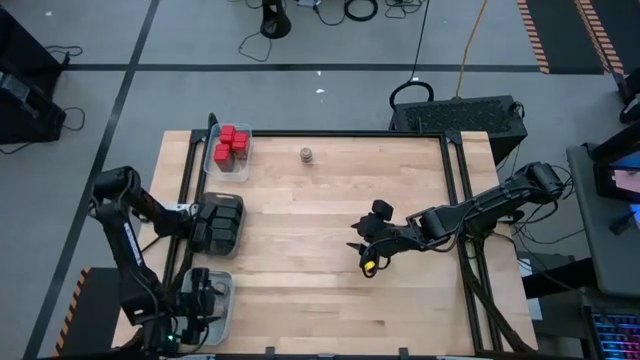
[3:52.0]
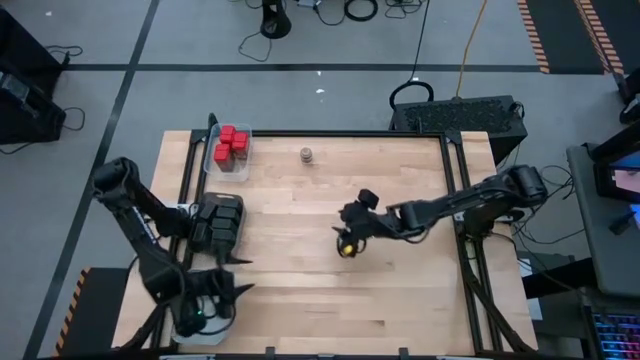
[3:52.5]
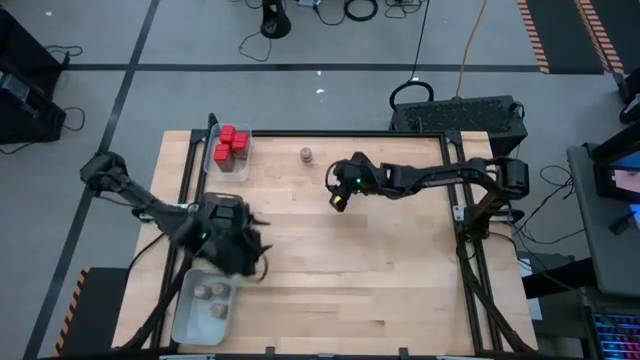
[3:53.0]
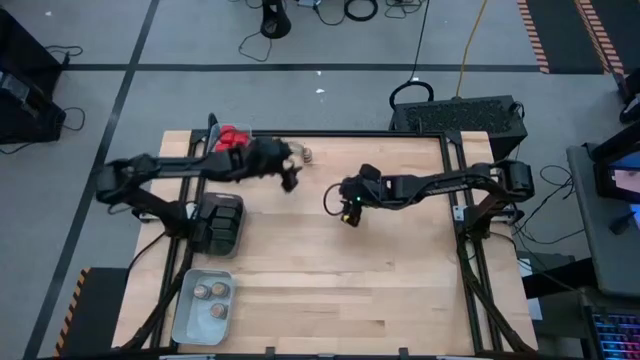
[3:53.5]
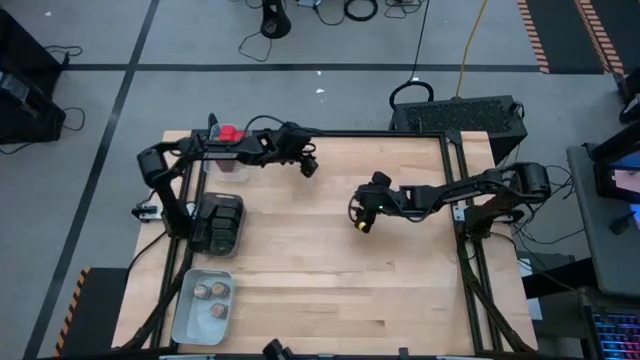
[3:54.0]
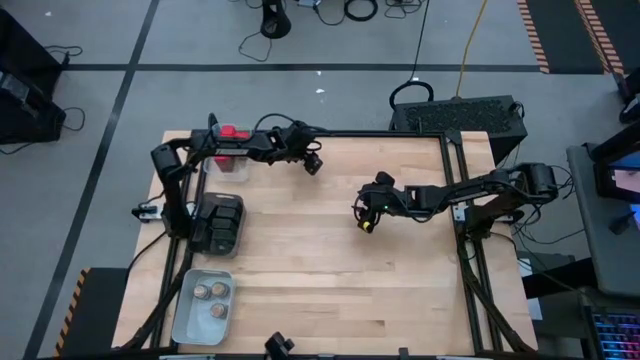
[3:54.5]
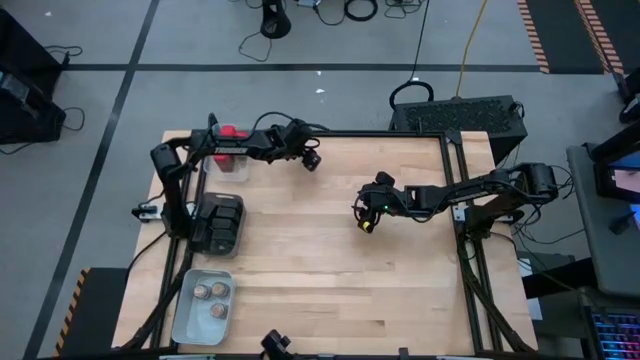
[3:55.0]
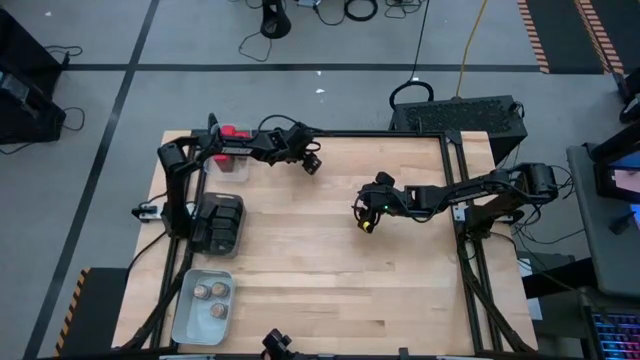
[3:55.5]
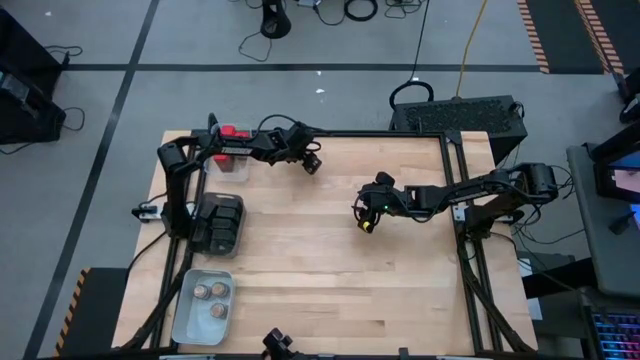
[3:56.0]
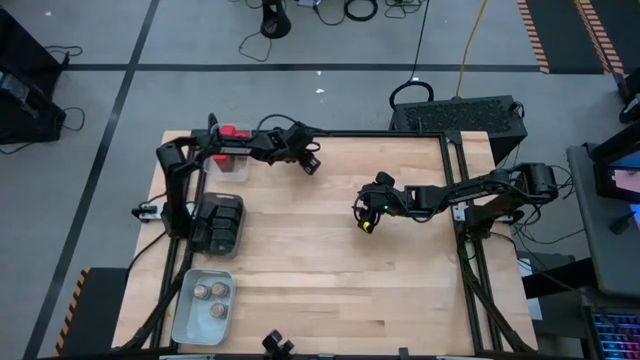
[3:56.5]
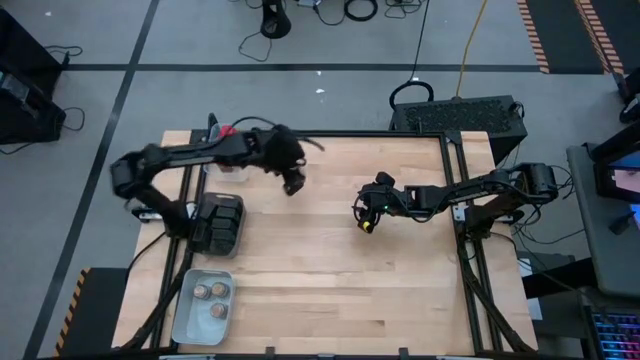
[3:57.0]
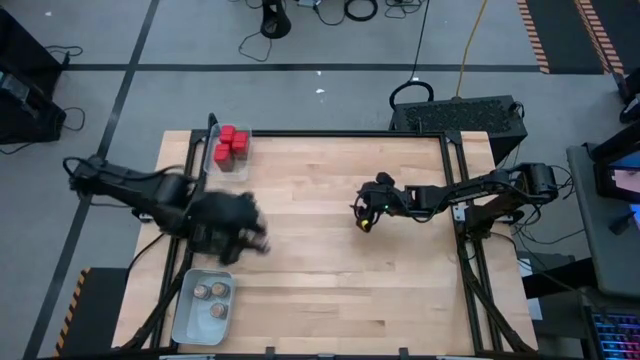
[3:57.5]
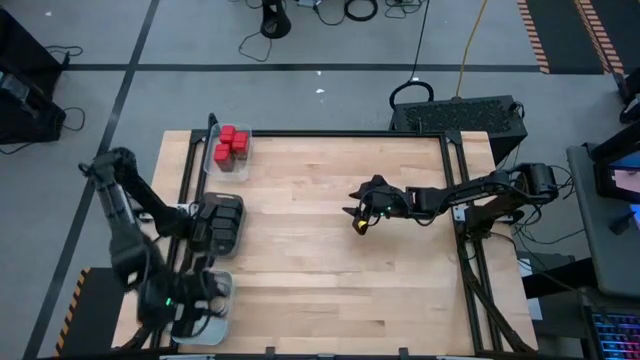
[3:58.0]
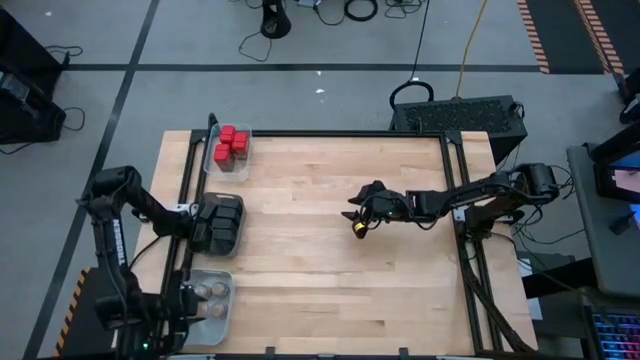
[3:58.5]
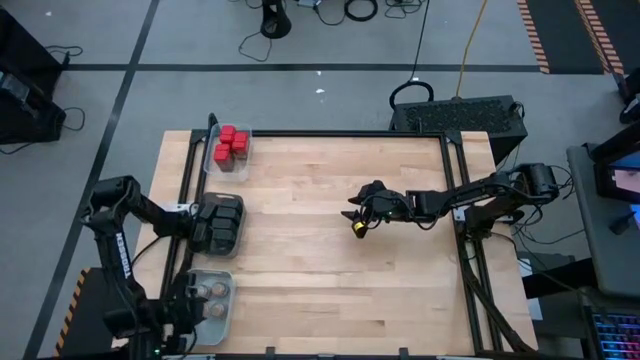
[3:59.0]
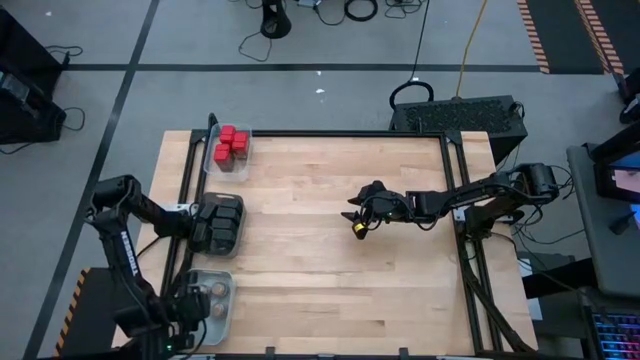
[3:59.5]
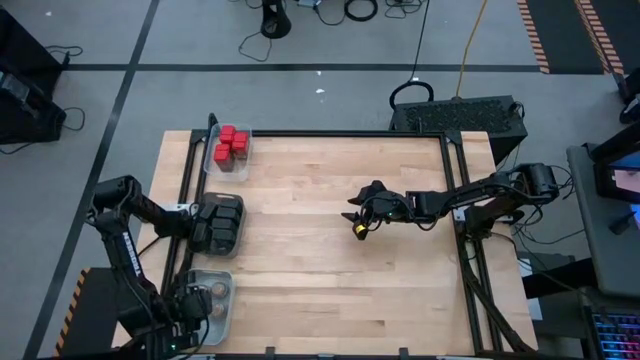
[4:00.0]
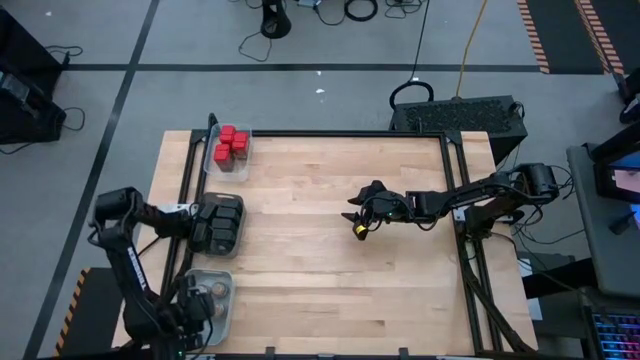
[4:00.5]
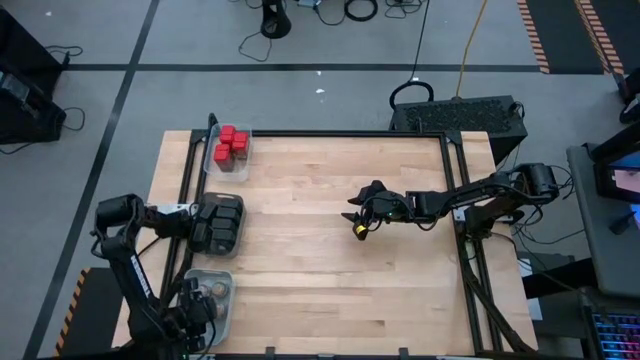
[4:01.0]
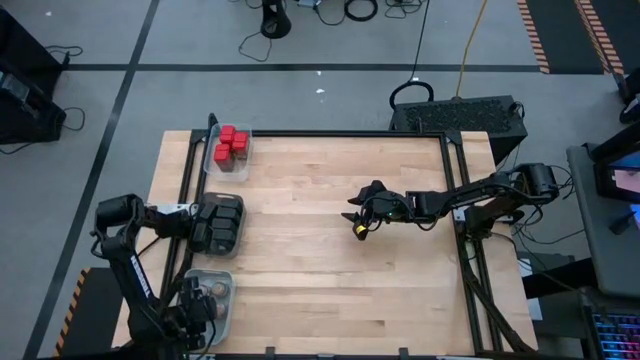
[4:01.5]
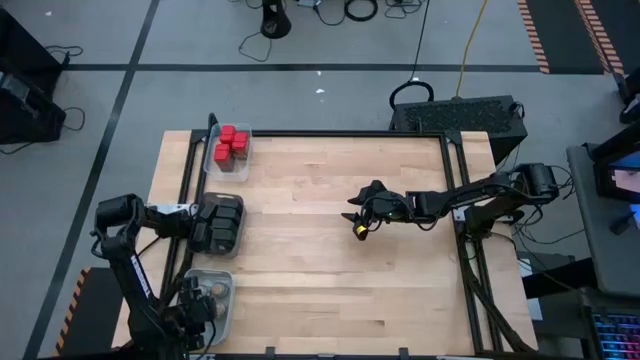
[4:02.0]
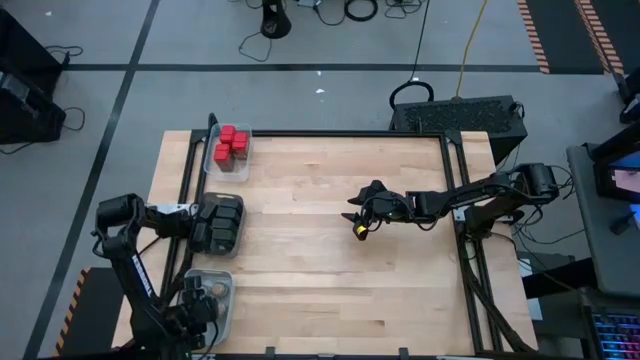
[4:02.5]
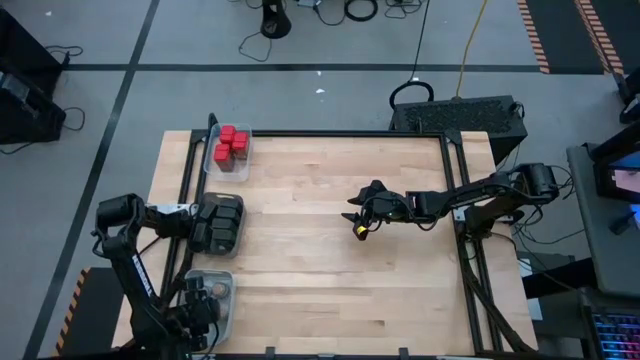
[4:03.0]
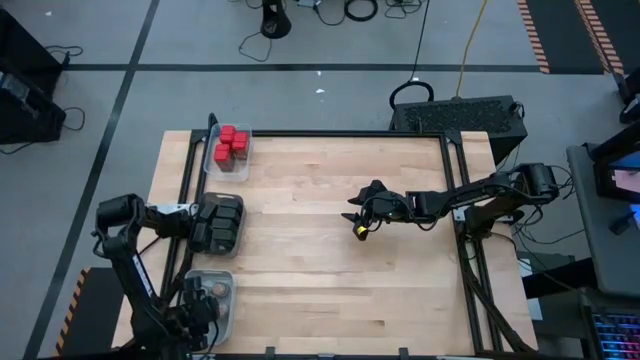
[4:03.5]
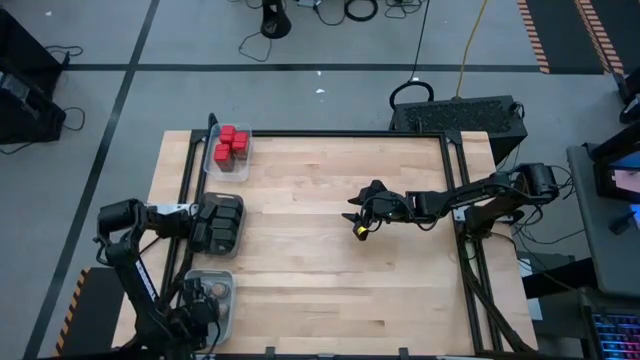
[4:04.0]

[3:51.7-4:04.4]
Task: Sort spices by type
Put the brown seasoning bottle into the gray bin

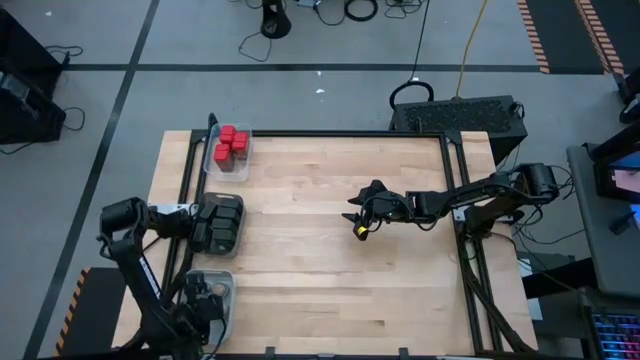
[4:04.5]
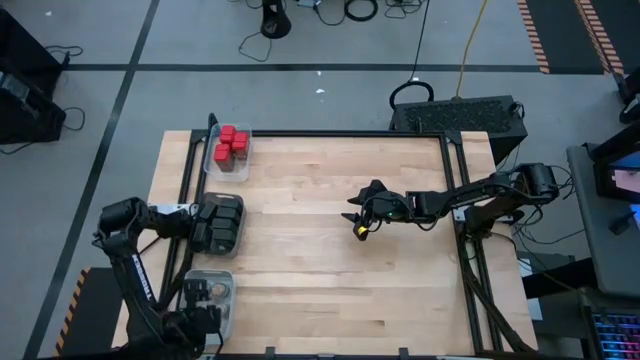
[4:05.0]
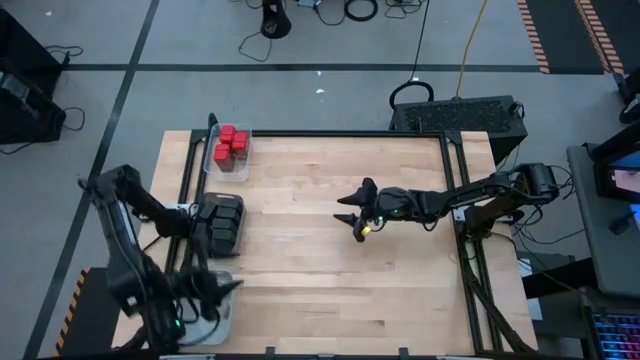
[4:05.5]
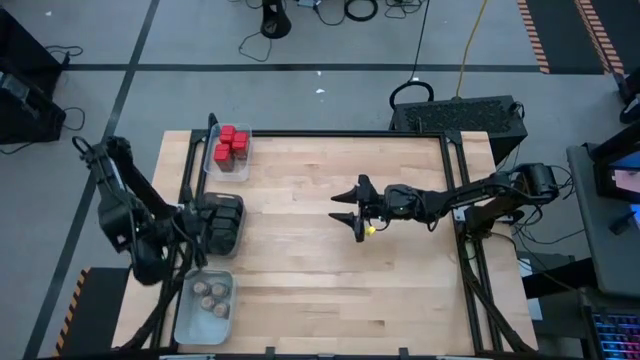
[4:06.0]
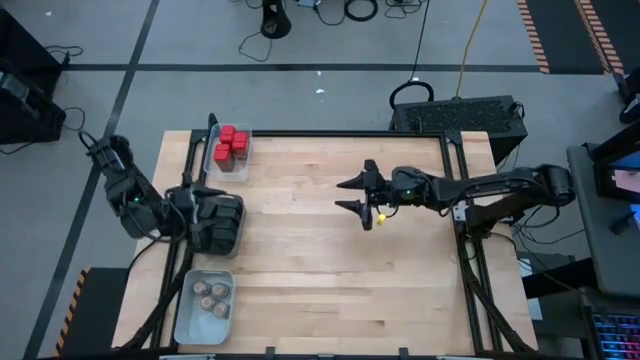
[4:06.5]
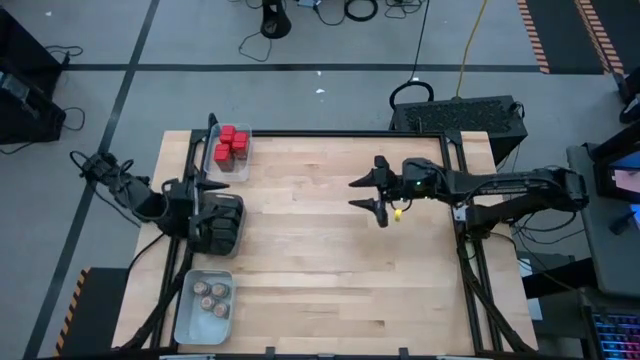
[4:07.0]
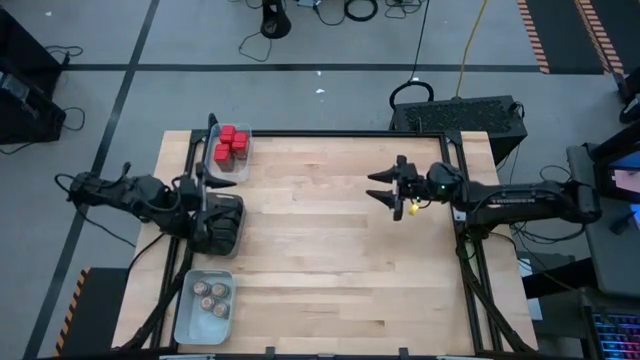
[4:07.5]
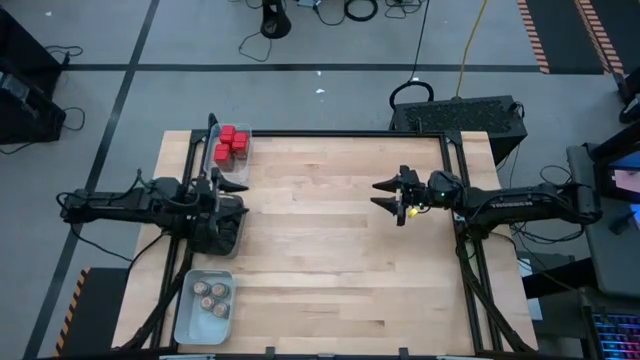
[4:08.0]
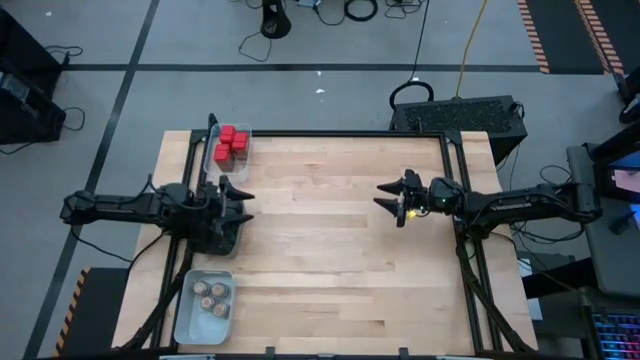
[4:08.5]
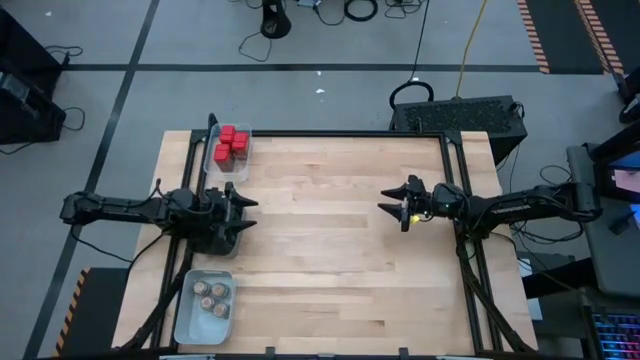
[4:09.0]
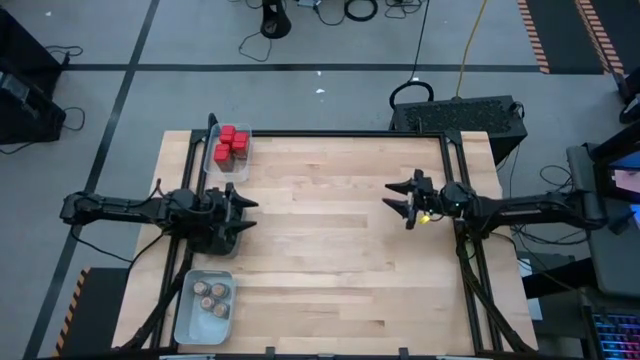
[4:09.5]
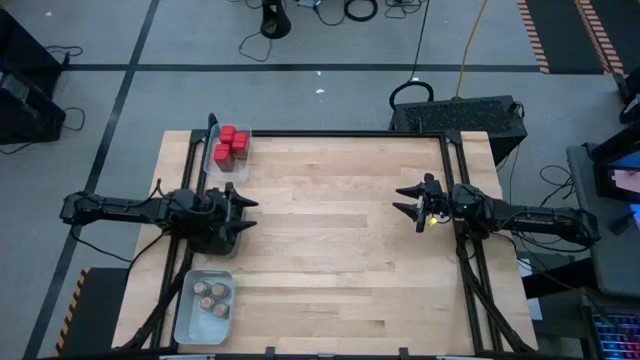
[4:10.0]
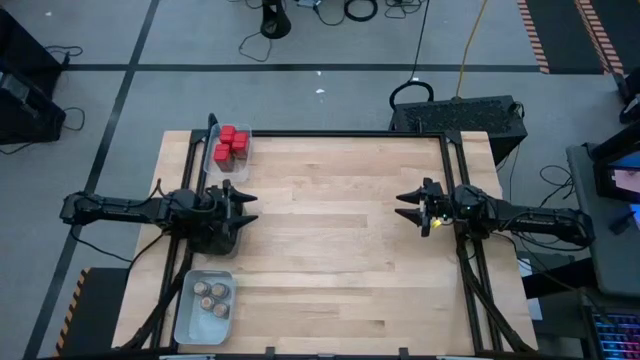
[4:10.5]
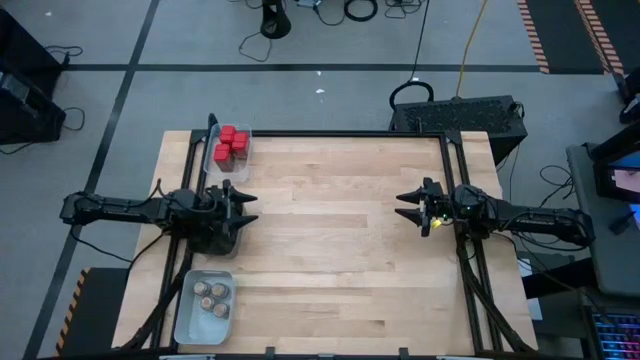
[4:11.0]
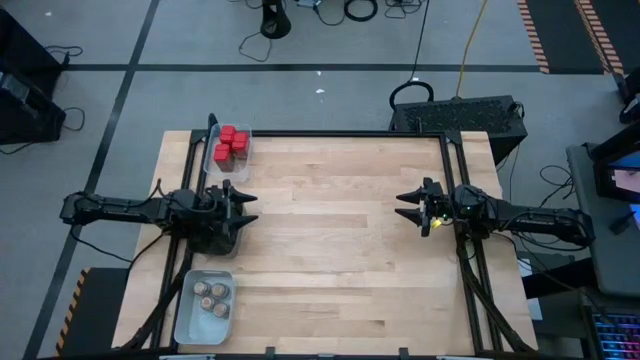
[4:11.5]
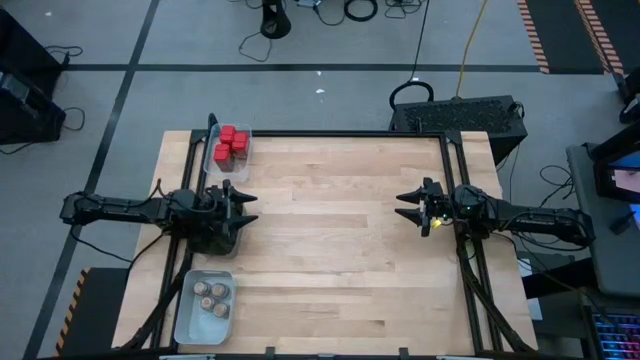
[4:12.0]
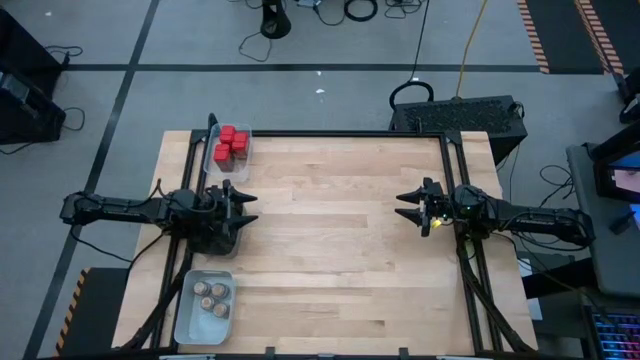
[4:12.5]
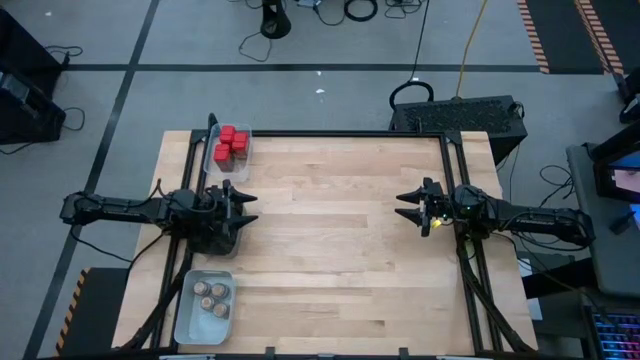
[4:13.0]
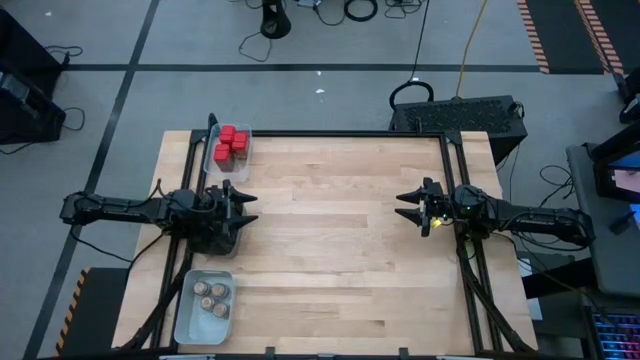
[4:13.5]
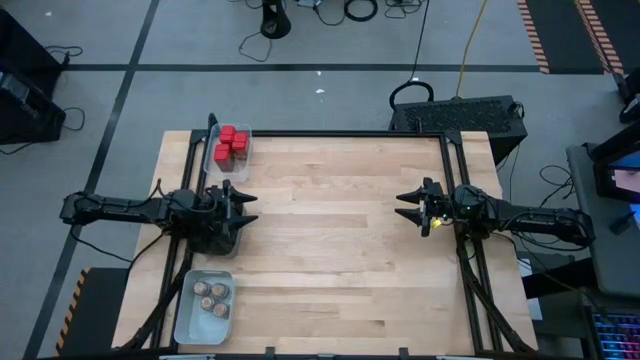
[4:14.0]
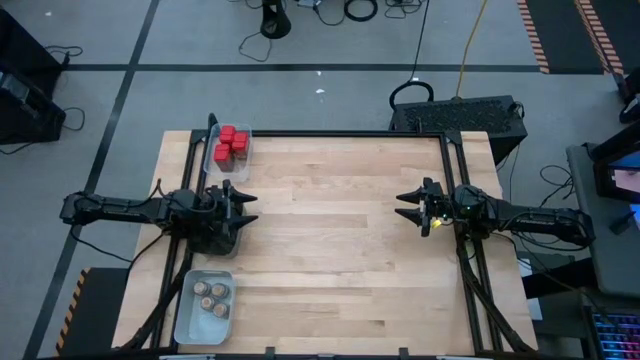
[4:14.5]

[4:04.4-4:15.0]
Return to Home Position
